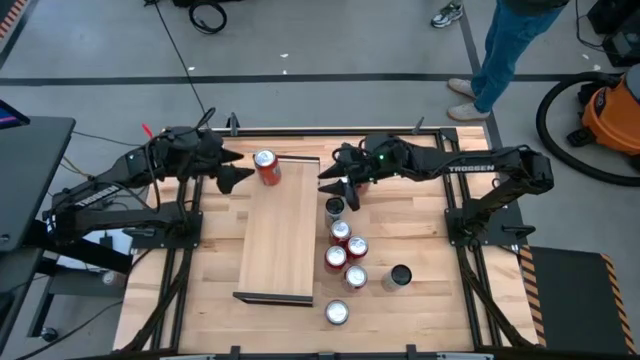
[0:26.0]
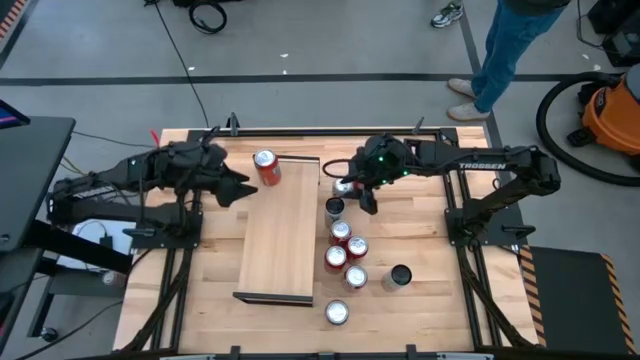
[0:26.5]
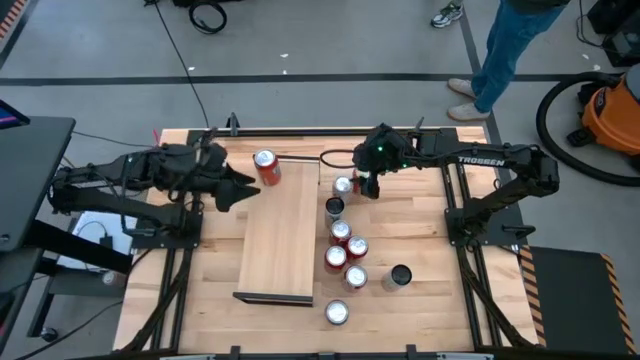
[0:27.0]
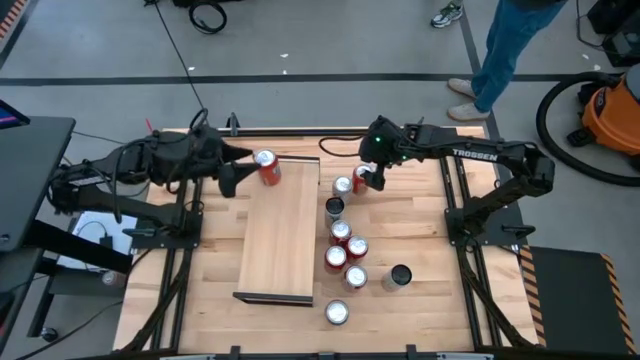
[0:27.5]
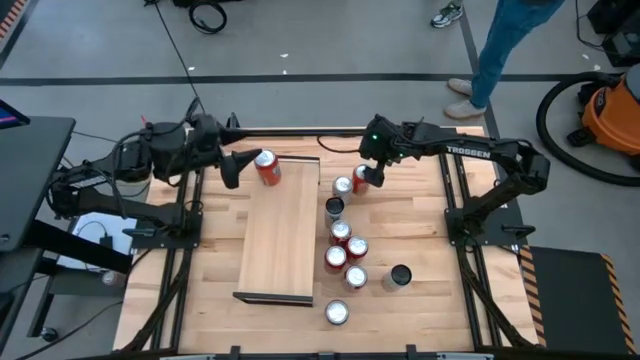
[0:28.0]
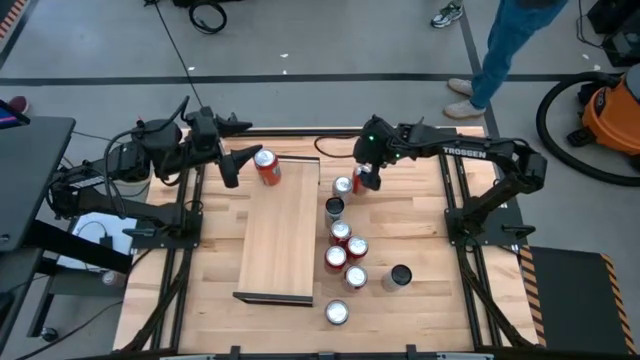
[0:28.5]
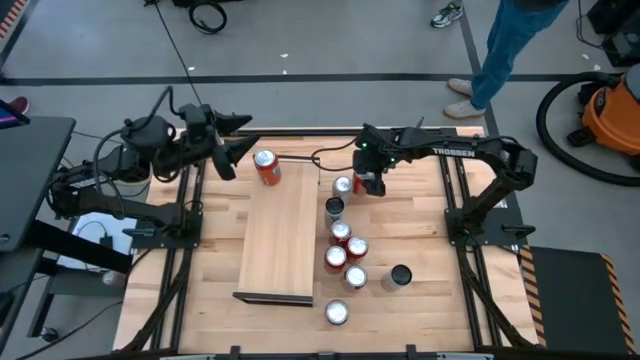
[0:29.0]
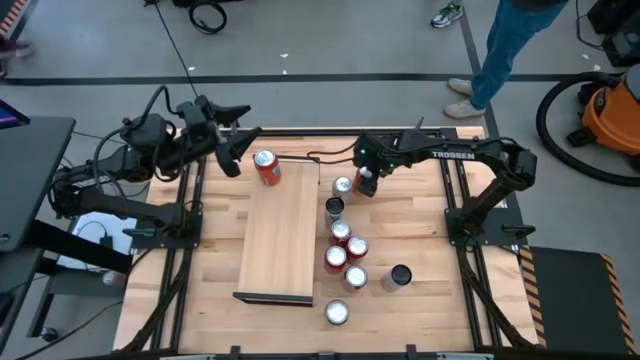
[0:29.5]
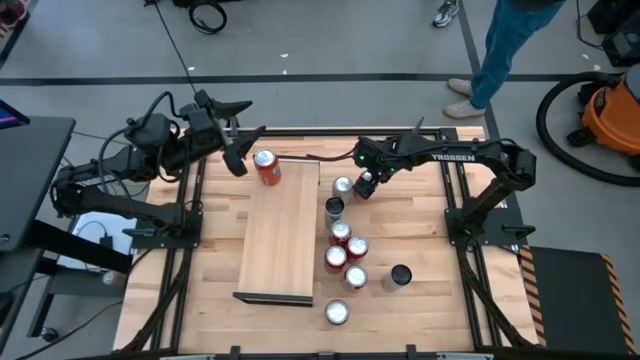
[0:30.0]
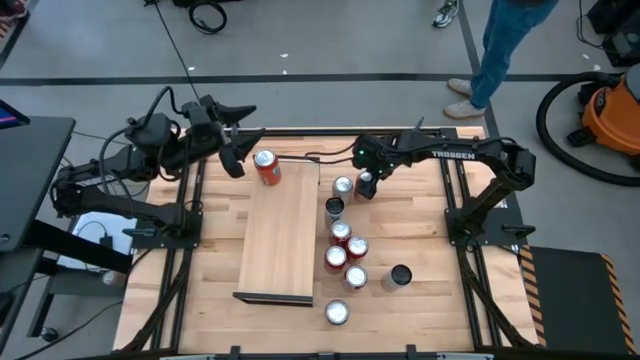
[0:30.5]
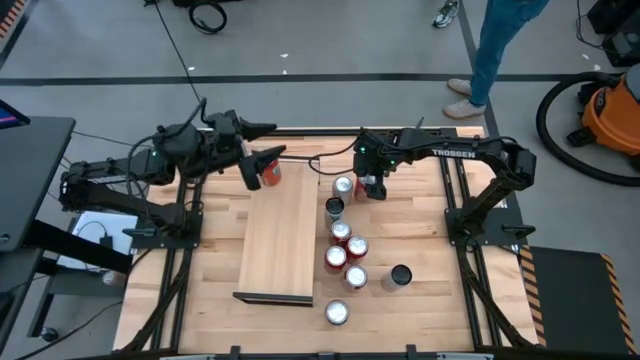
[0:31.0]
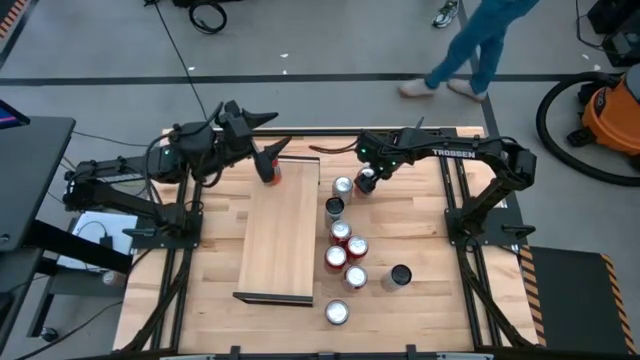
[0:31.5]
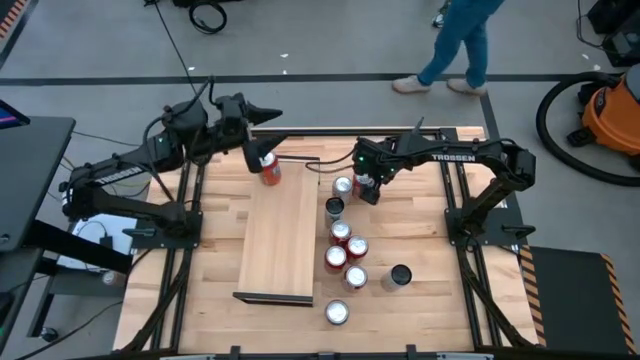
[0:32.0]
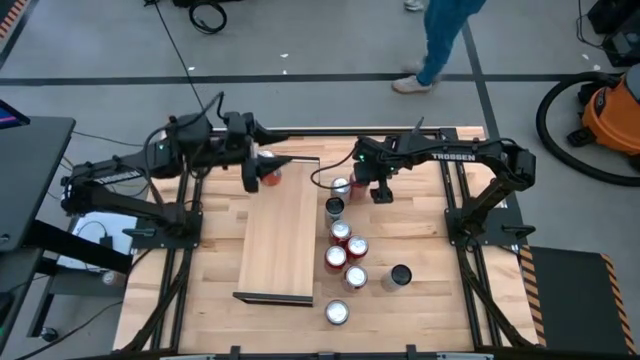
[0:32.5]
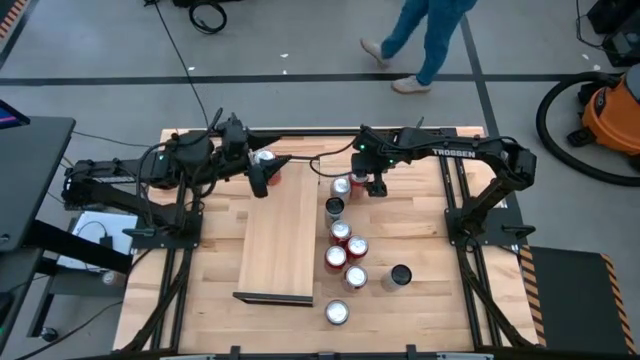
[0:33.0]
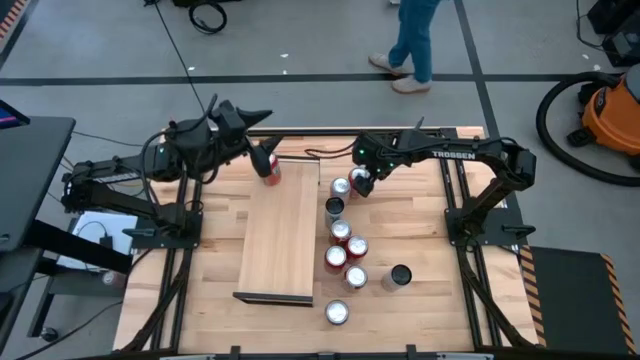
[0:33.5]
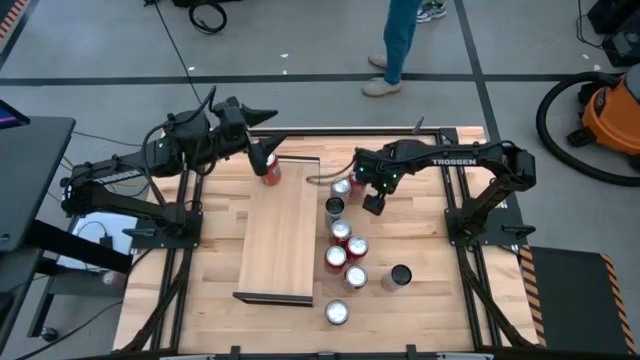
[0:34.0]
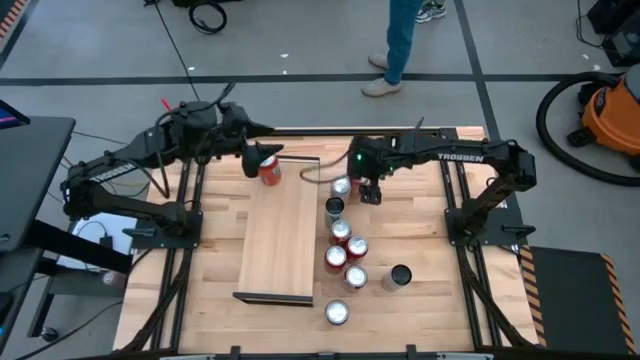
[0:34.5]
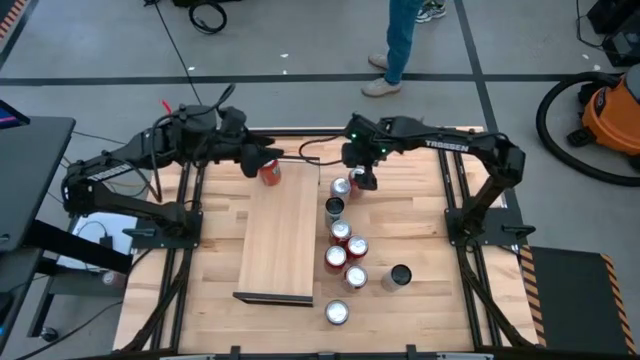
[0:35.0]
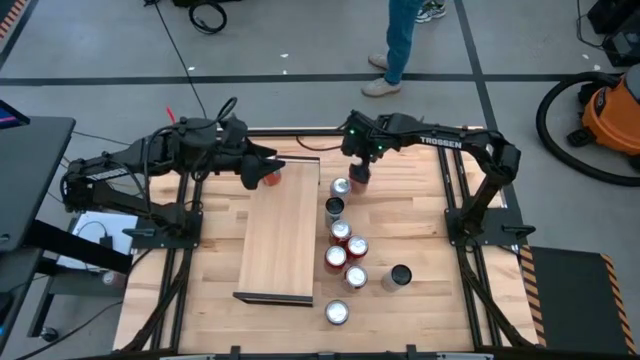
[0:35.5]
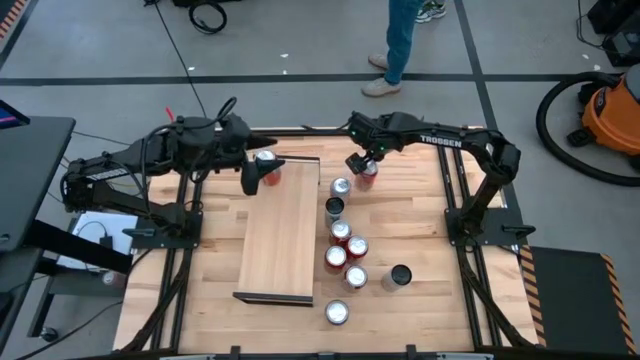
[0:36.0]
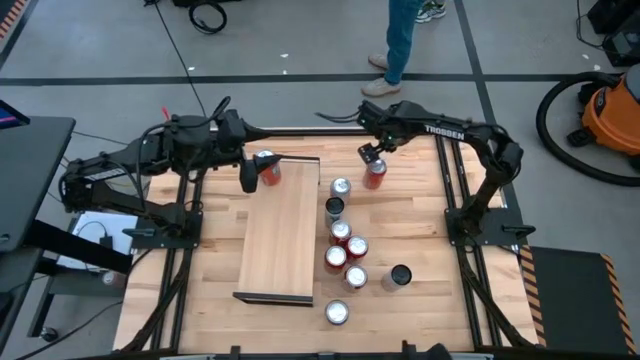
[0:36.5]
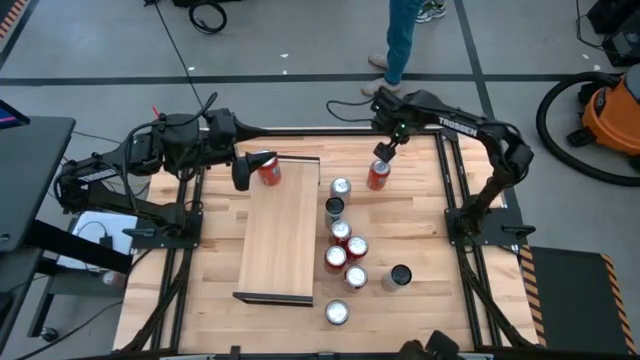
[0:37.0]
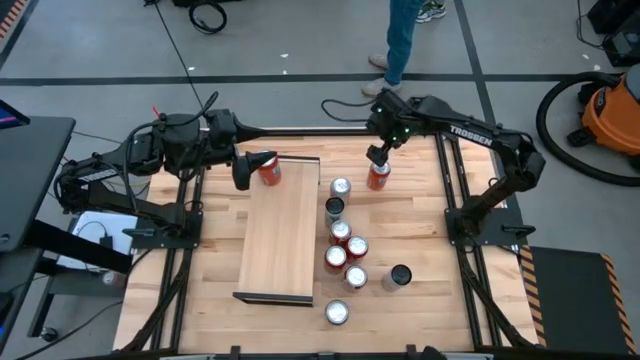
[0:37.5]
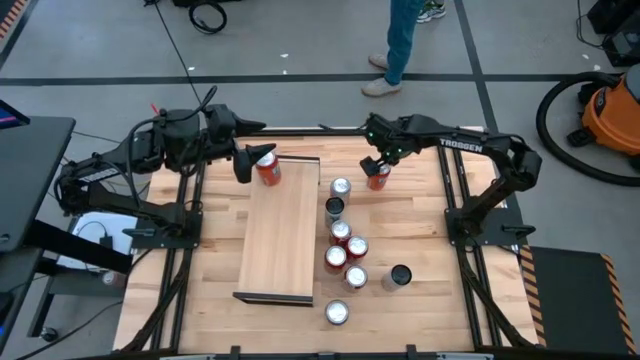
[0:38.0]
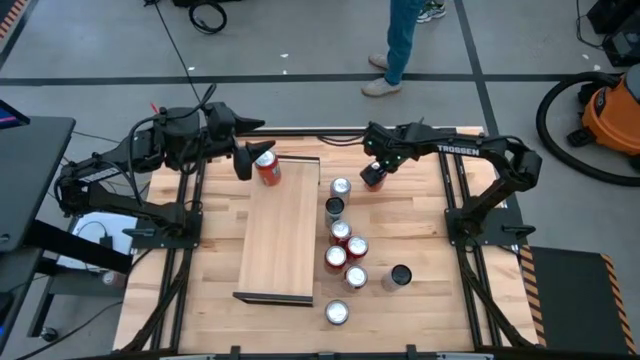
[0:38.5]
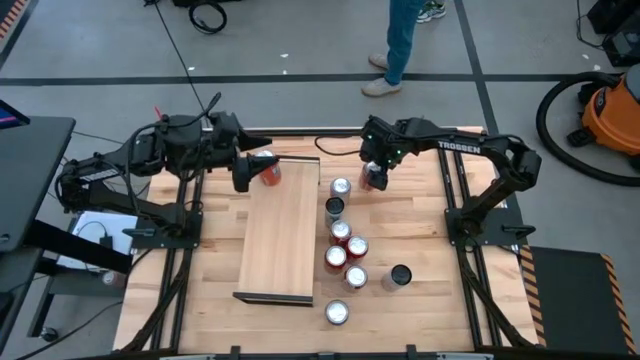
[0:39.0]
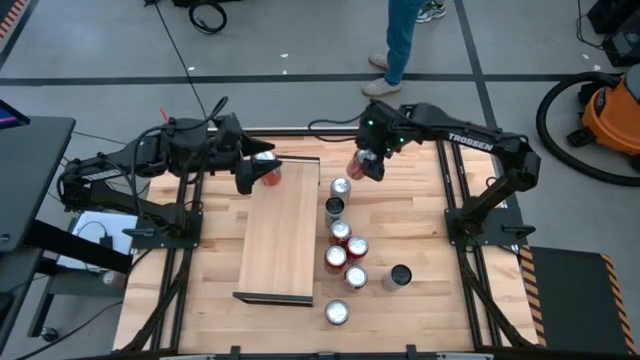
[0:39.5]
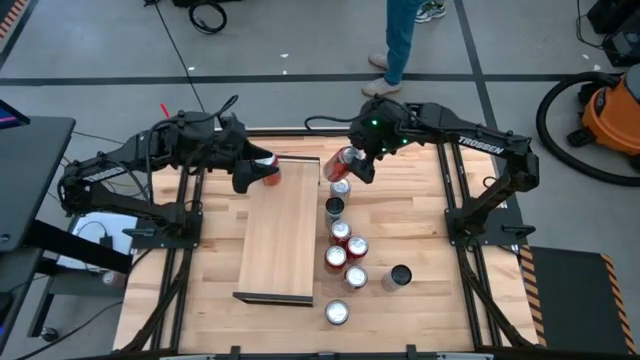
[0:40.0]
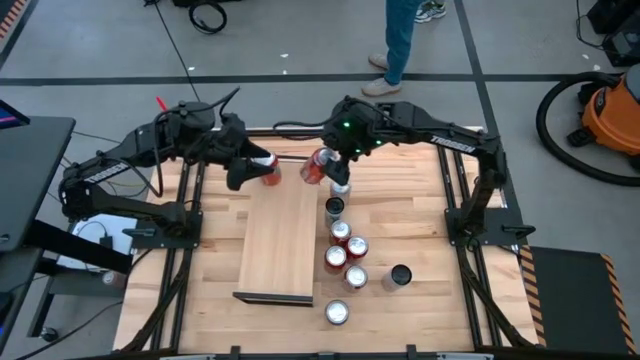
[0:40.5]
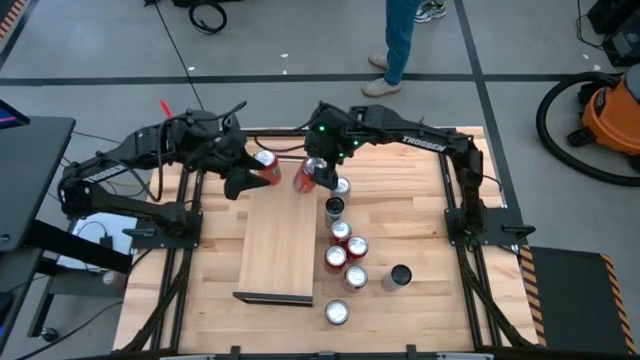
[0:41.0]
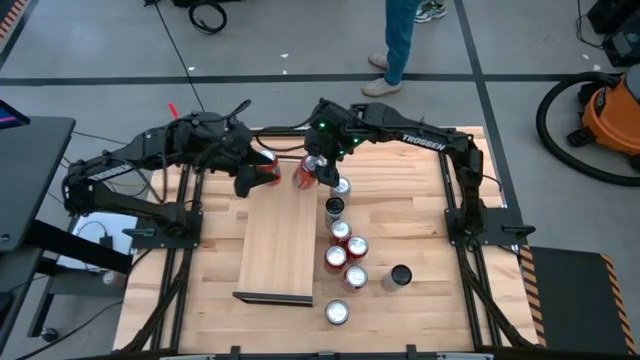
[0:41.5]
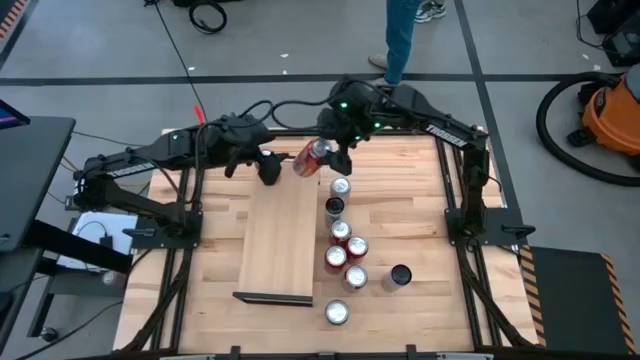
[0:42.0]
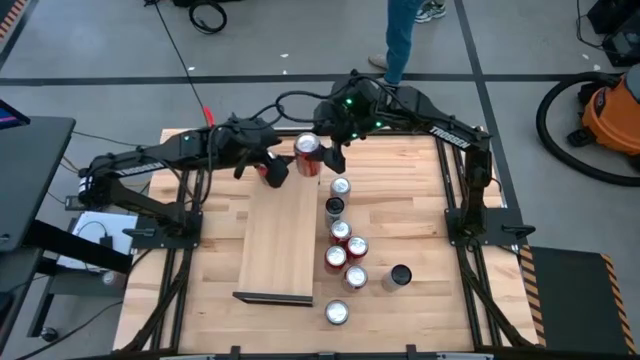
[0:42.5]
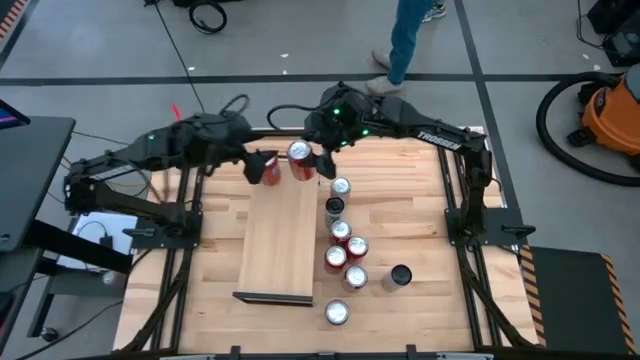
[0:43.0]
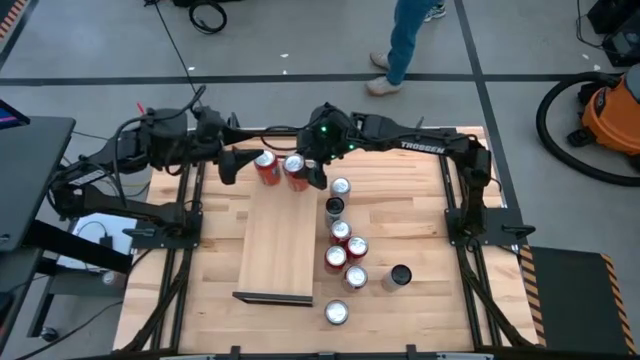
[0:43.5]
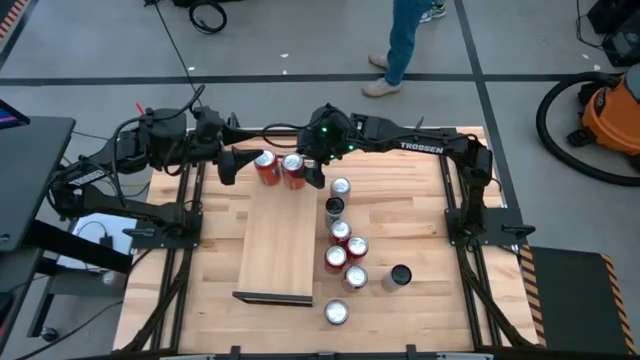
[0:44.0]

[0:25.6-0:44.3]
Task: Place canned beverage on shelf
Put the orange soda can aligned with the other orange soda can on the shelf

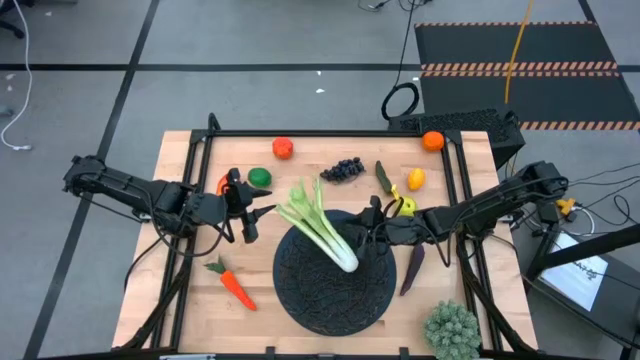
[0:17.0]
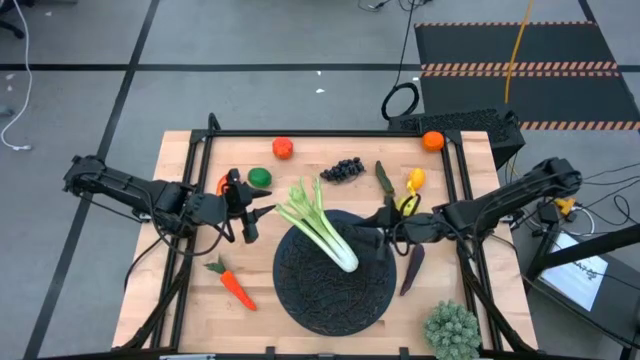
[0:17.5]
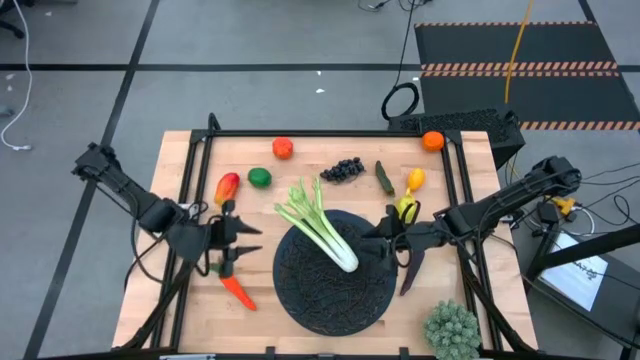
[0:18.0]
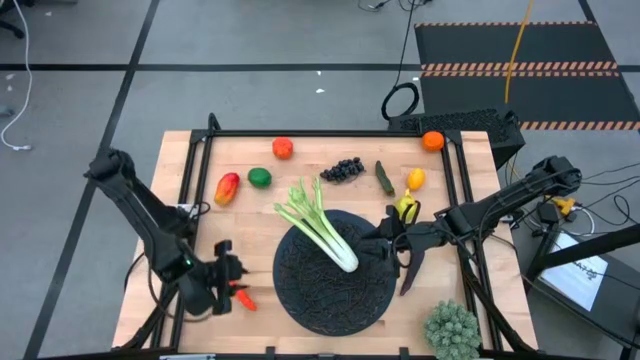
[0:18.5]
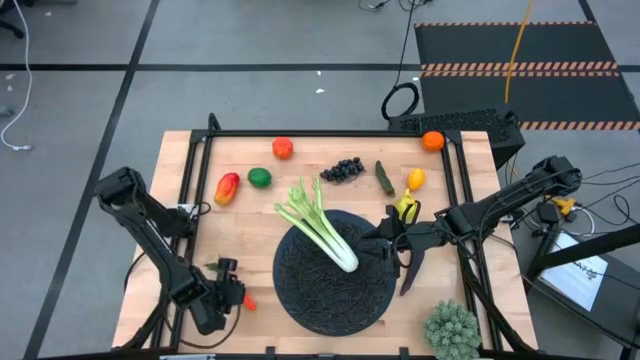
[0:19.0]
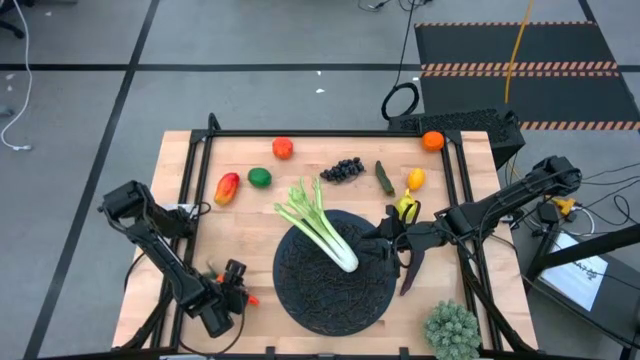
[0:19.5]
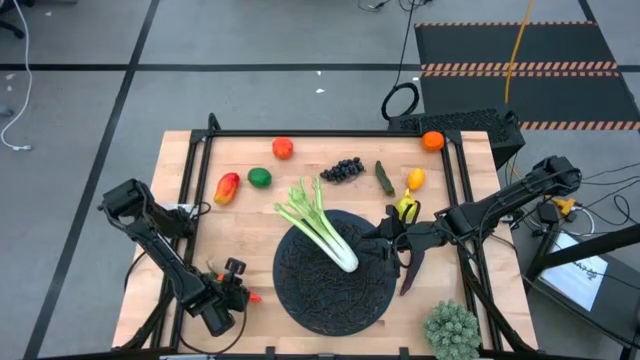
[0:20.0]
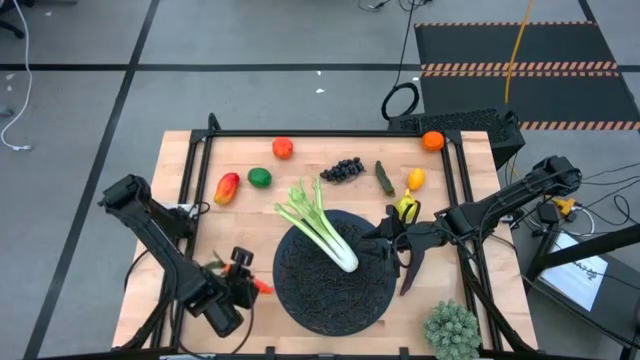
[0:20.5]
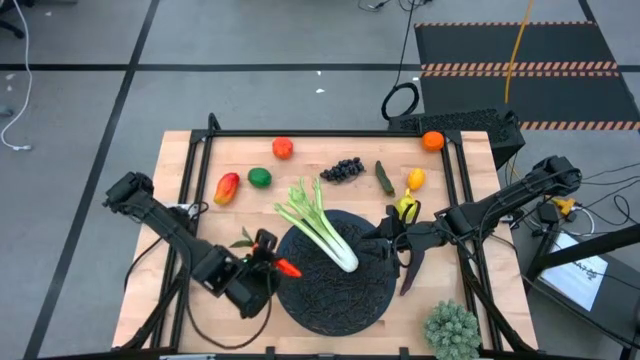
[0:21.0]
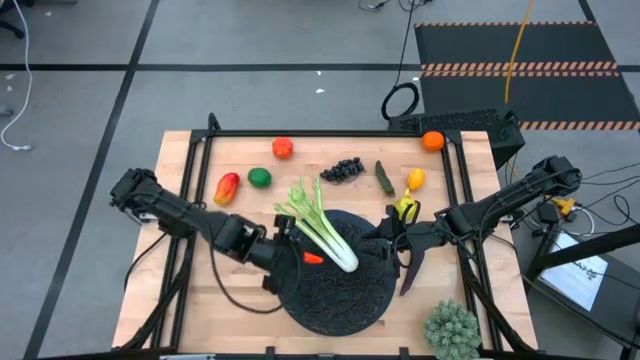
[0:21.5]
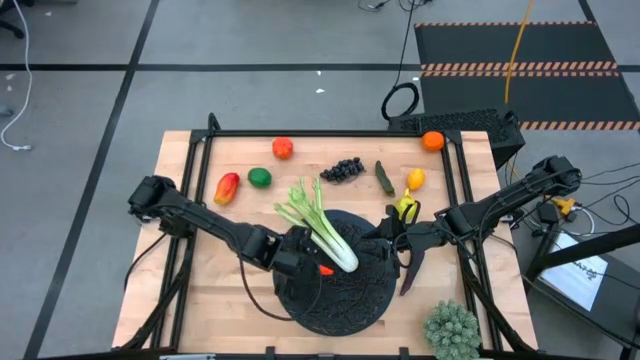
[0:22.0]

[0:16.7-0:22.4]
Task: Build produce basket
Put the orange carrot into the black mesh basket
